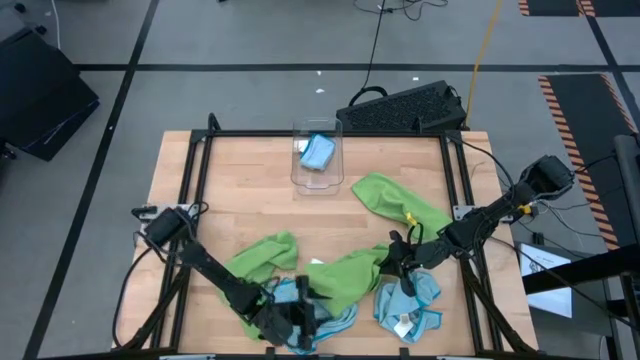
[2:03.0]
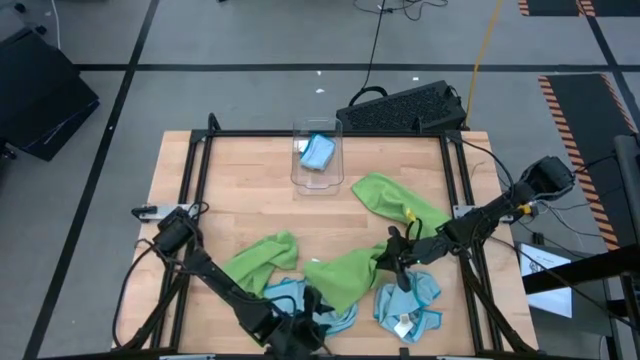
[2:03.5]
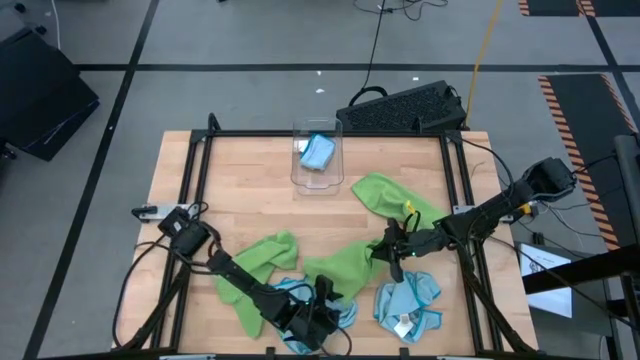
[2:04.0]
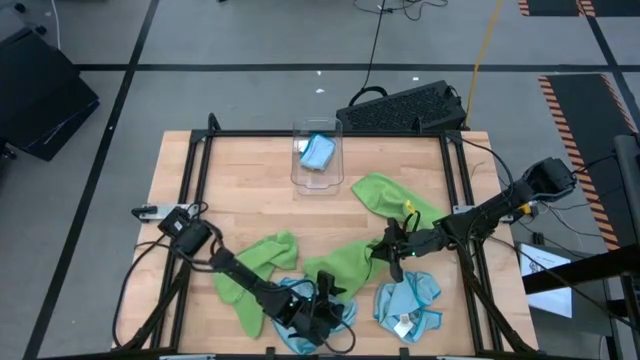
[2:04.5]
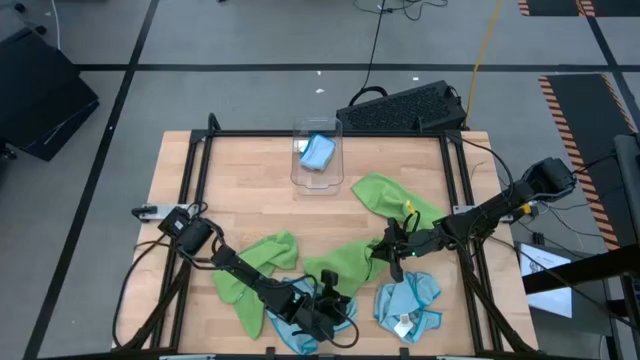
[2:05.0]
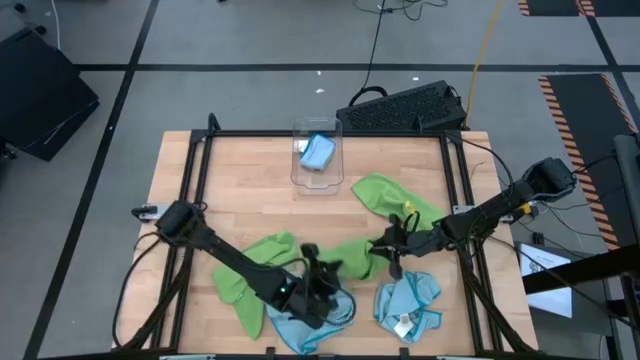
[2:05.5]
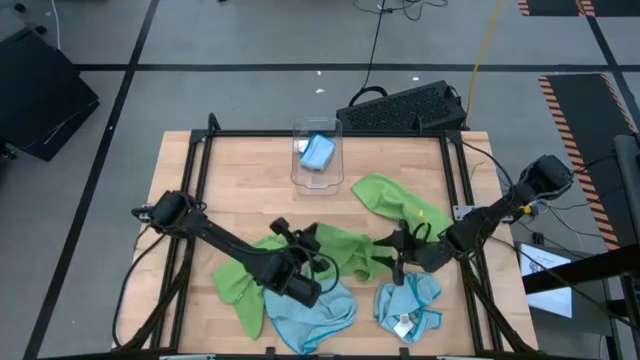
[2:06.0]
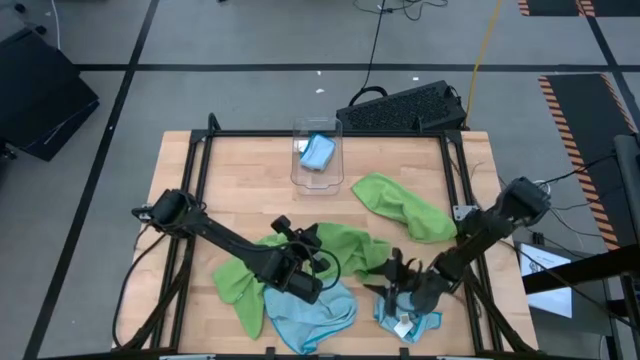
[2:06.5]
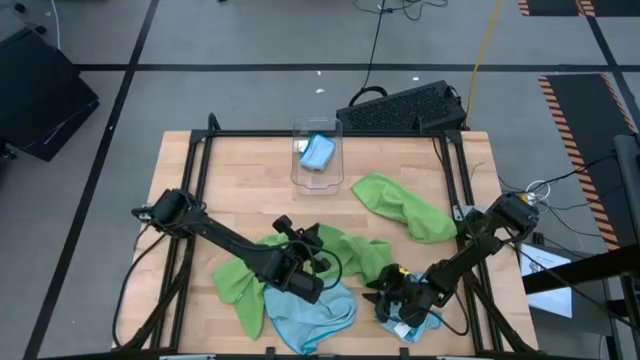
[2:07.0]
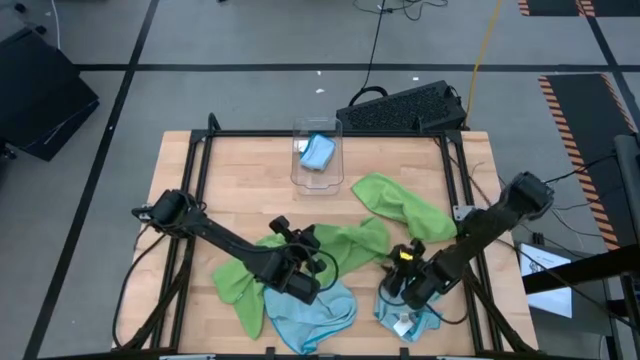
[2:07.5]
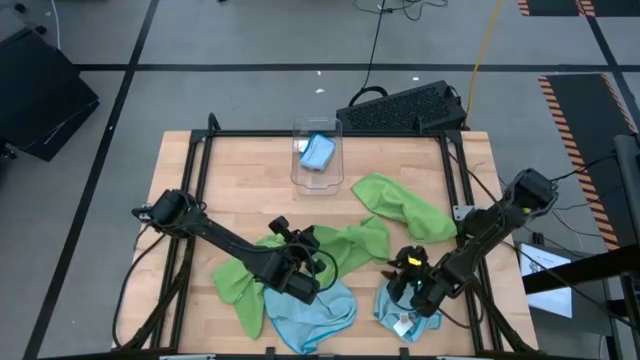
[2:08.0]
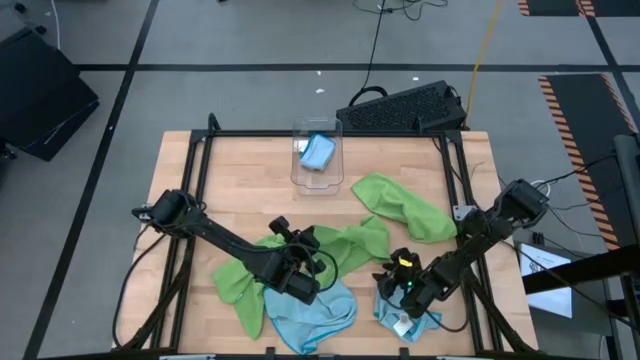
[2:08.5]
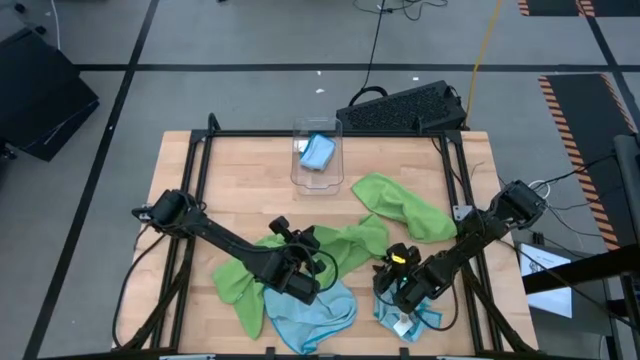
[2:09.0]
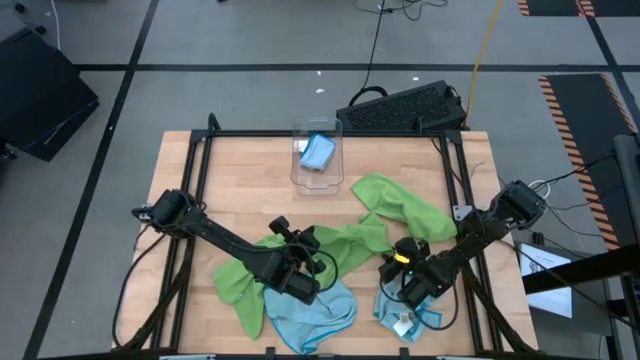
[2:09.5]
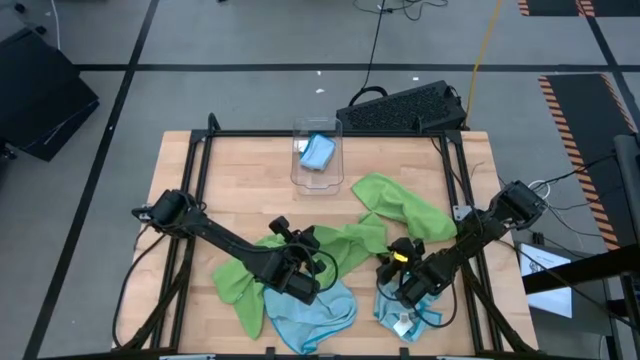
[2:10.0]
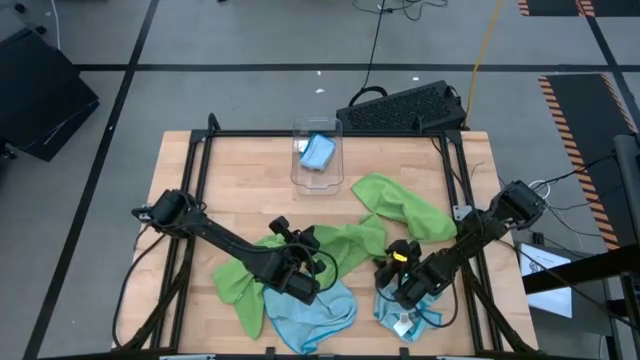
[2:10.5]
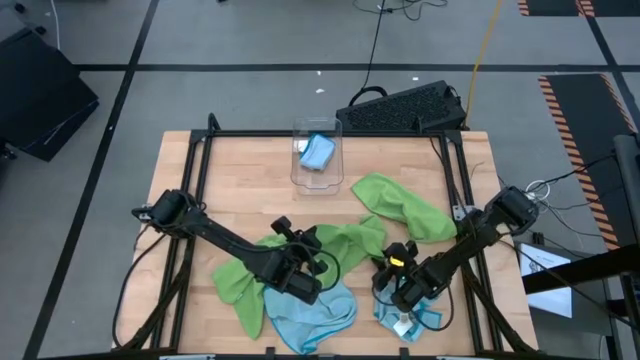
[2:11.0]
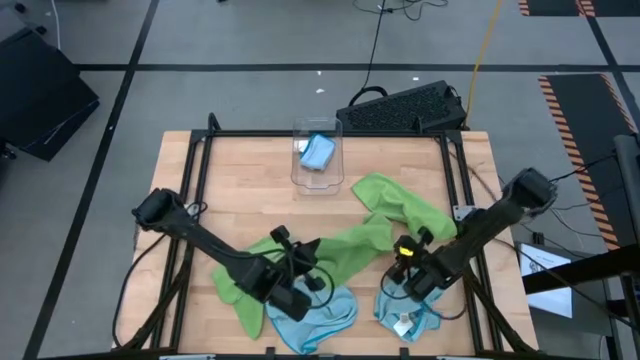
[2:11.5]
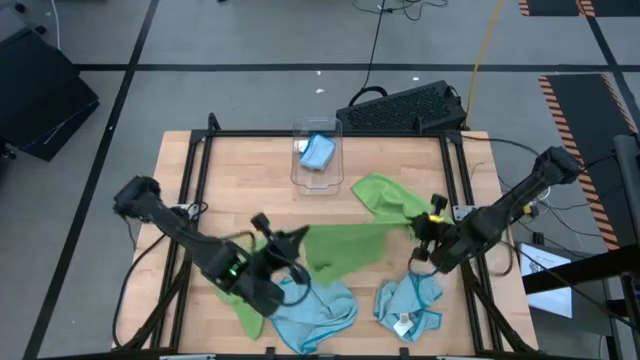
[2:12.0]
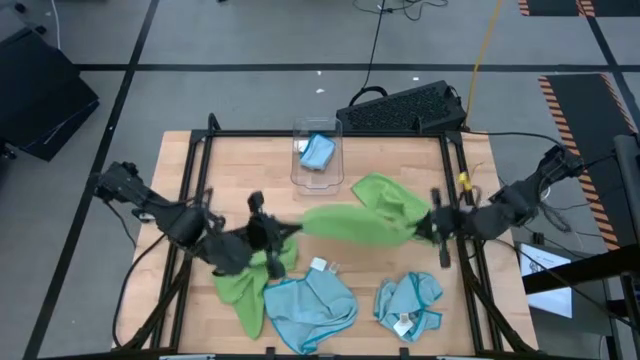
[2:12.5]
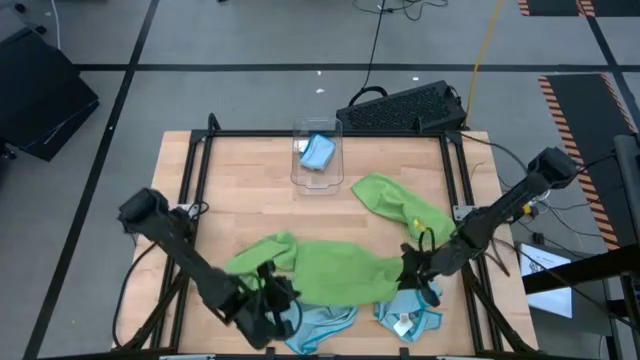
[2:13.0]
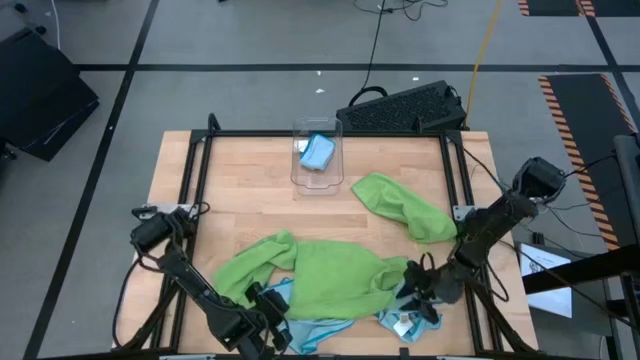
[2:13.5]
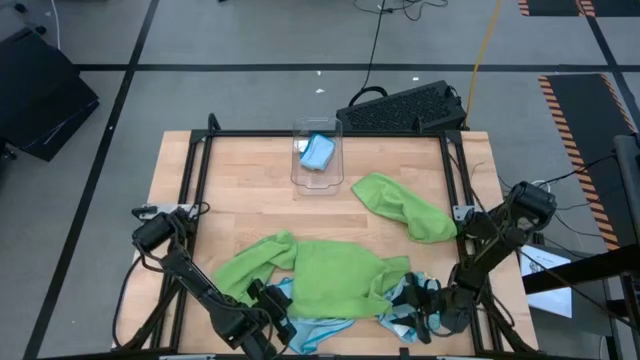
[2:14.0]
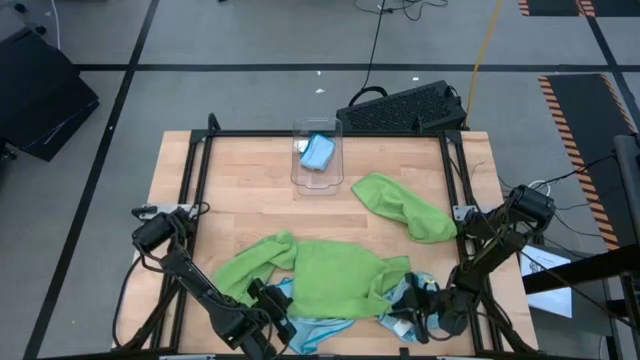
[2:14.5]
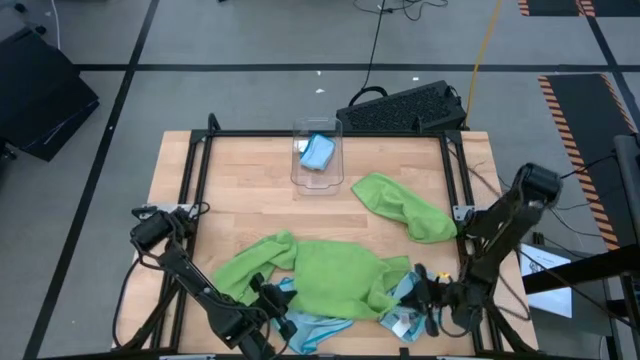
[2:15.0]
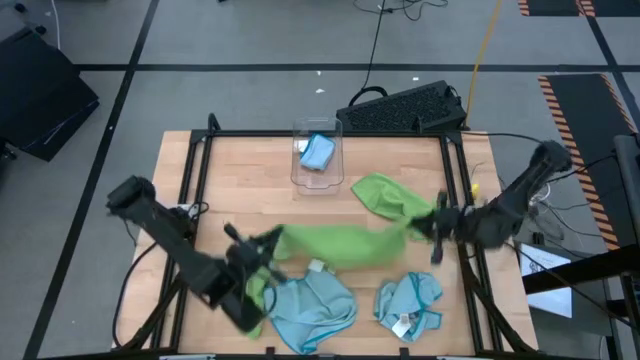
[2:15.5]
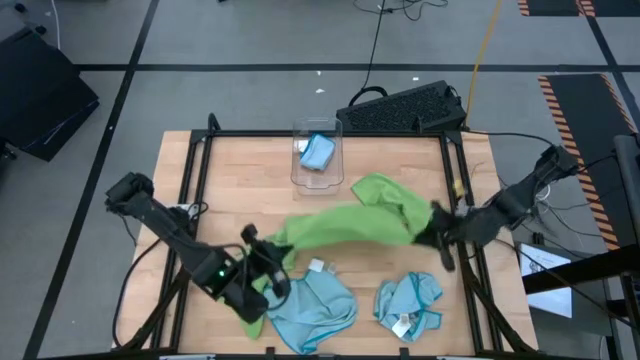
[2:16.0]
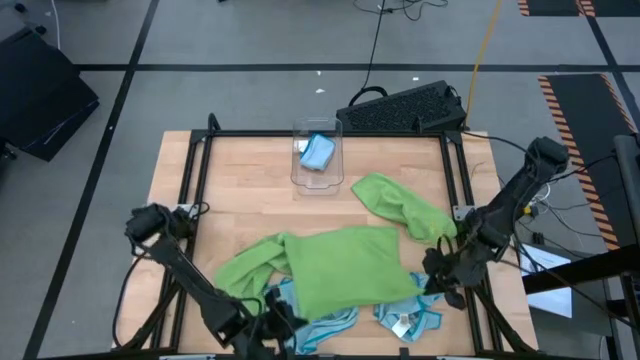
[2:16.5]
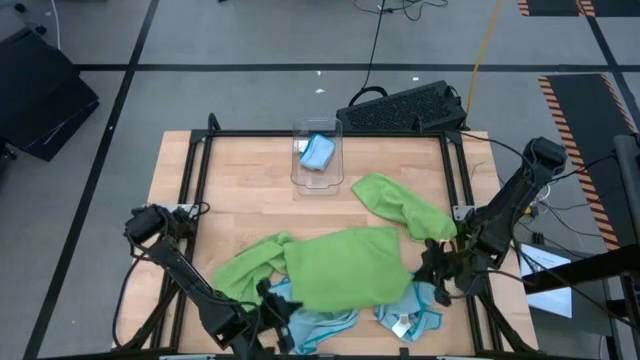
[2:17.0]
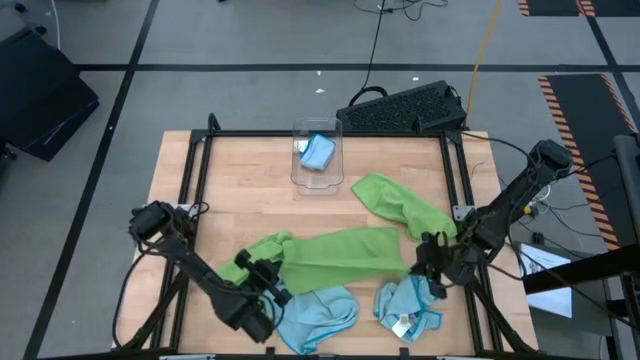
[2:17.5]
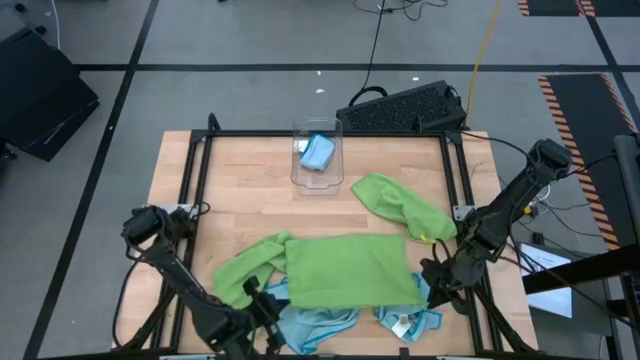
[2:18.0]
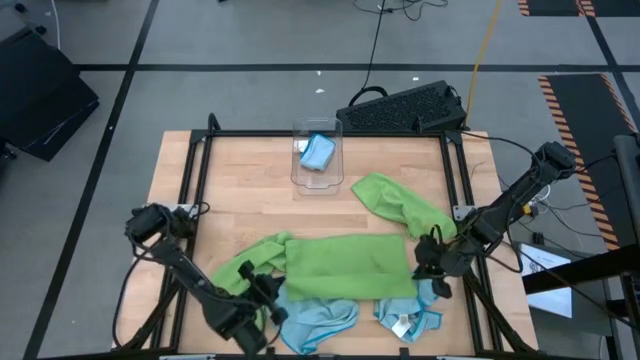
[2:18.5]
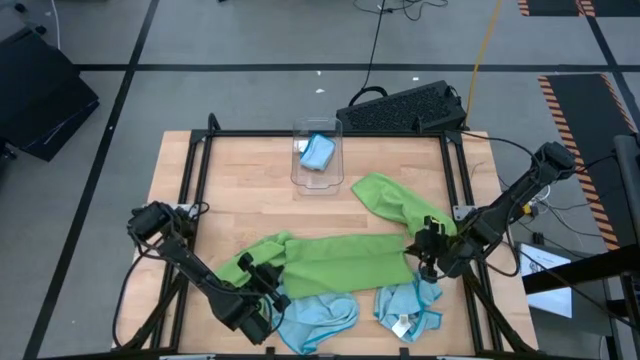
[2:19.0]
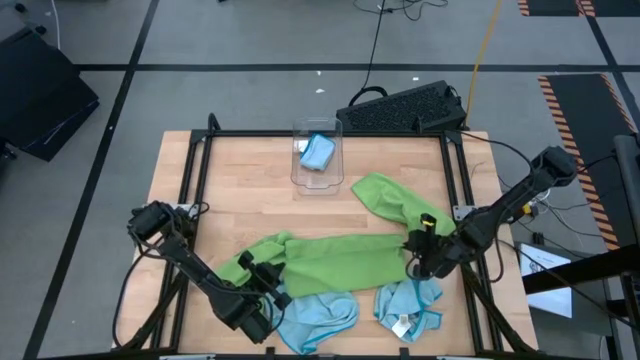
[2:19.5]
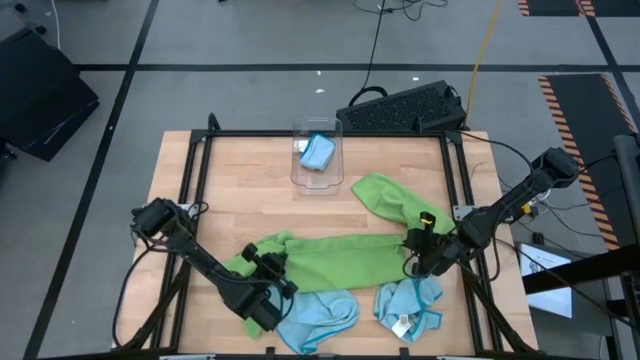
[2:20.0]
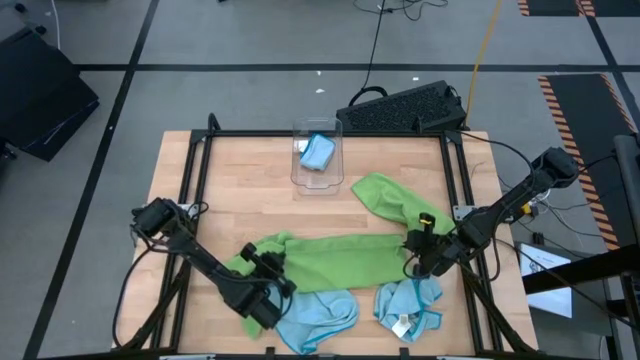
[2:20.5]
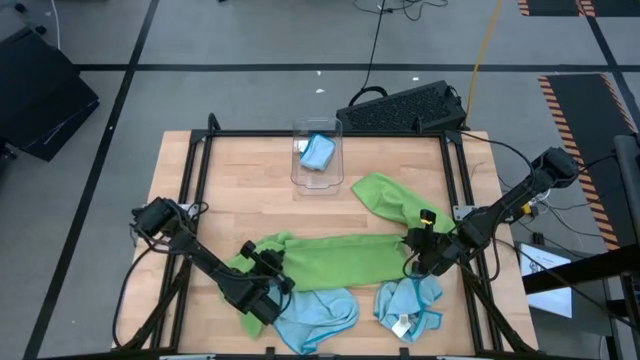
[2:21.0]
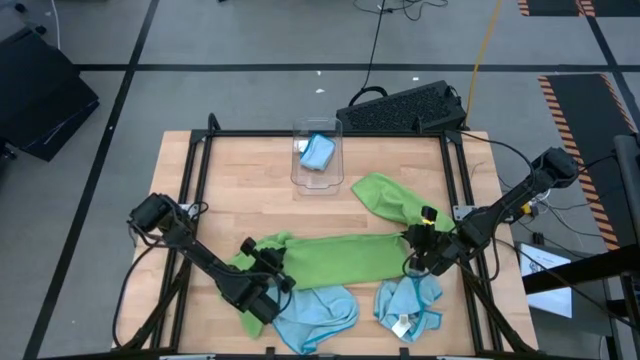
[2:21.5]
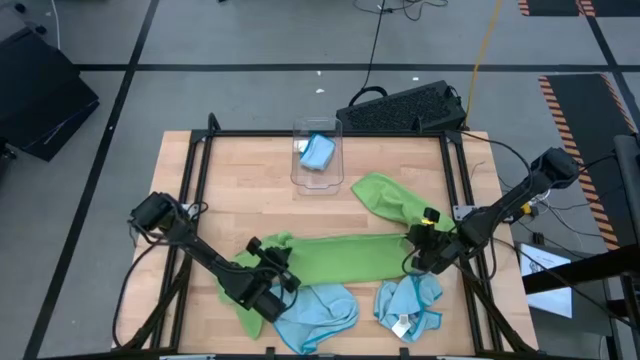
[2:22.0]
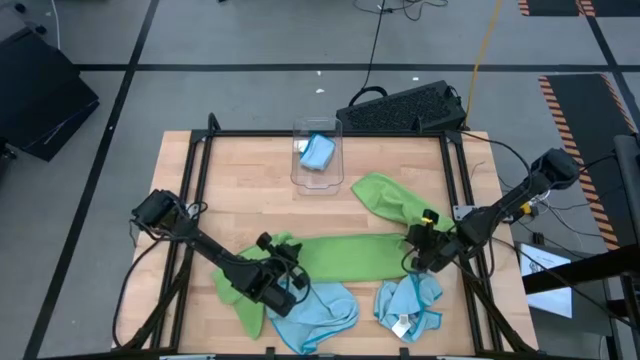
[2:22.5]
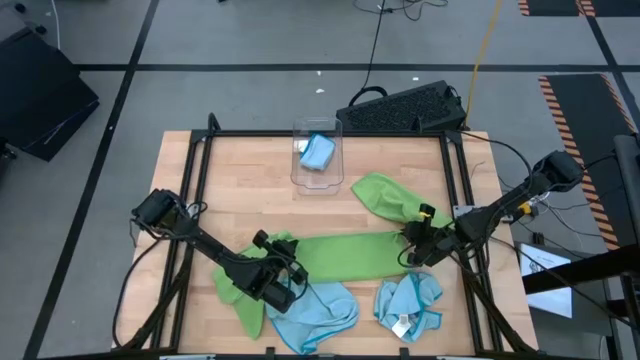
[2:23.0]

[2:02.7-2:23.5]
Task: Fold microfiber towels
Fold the center green towel
